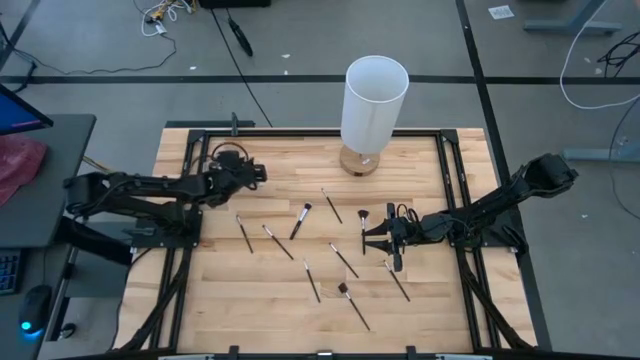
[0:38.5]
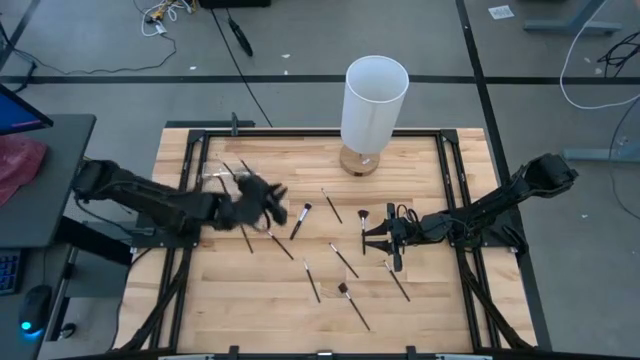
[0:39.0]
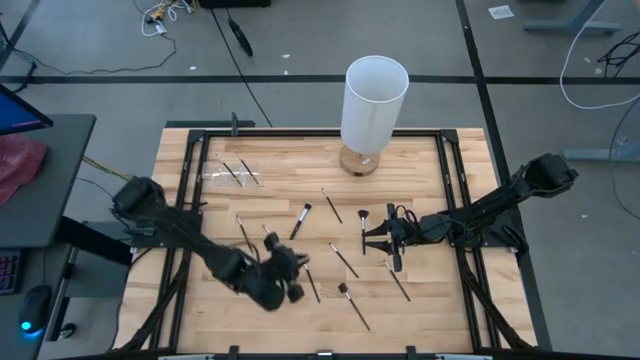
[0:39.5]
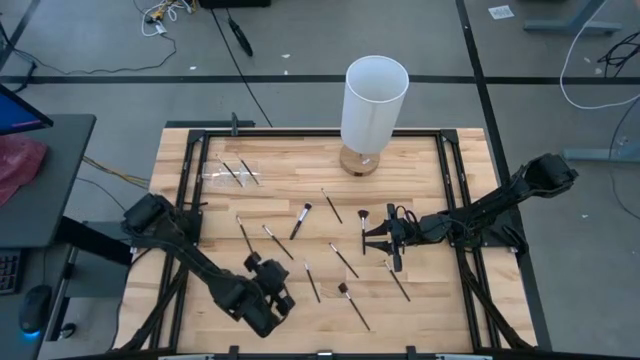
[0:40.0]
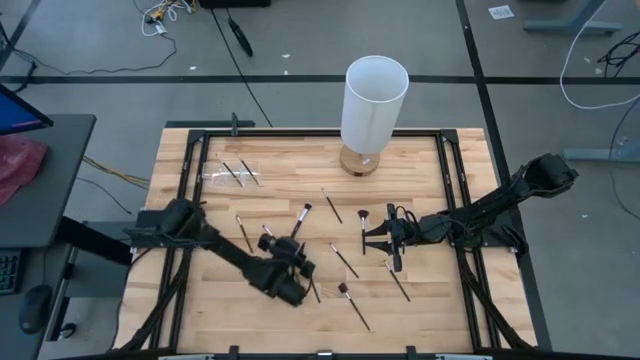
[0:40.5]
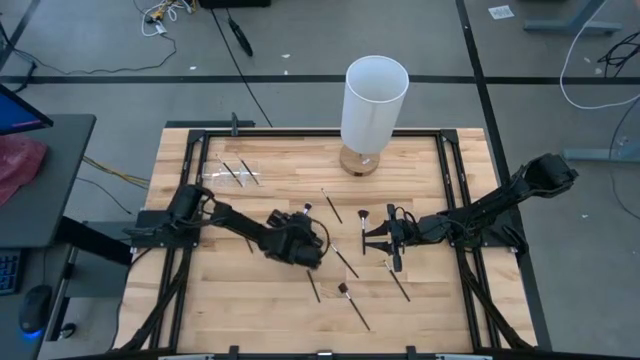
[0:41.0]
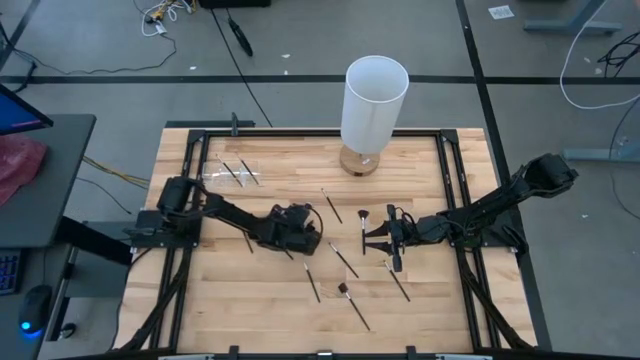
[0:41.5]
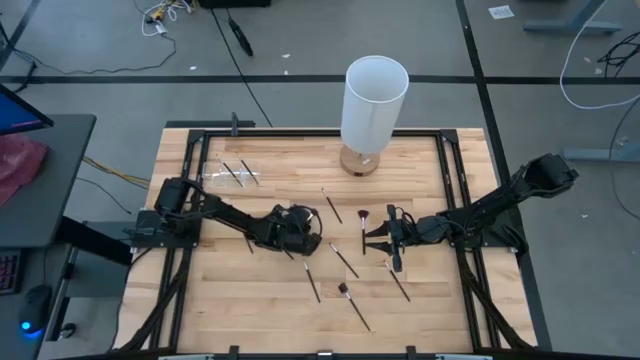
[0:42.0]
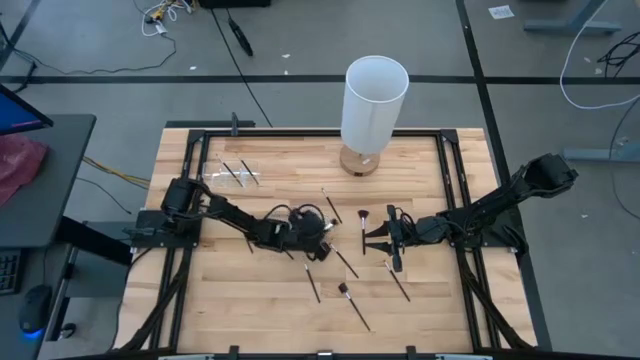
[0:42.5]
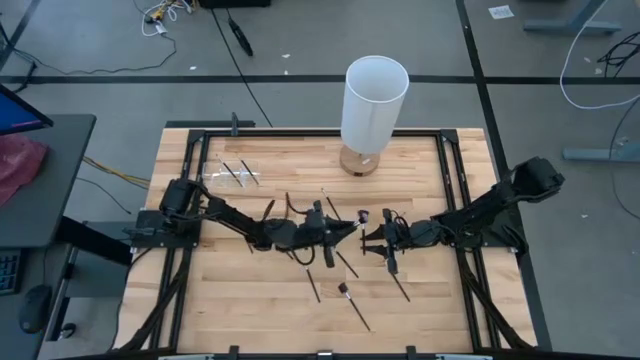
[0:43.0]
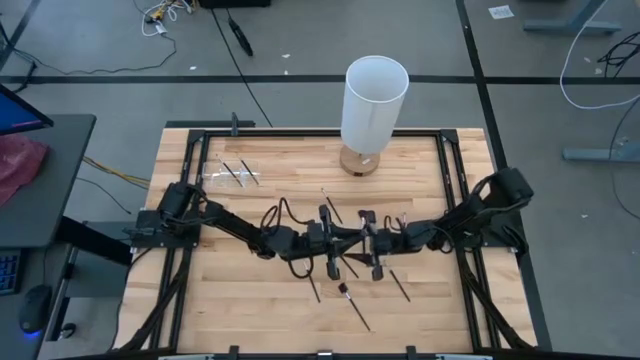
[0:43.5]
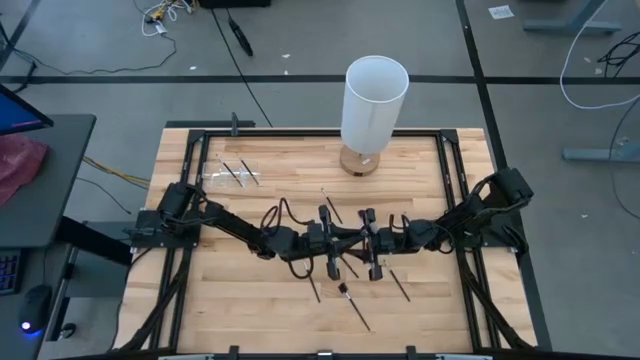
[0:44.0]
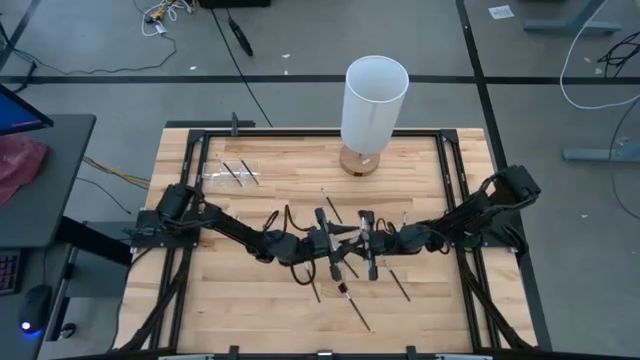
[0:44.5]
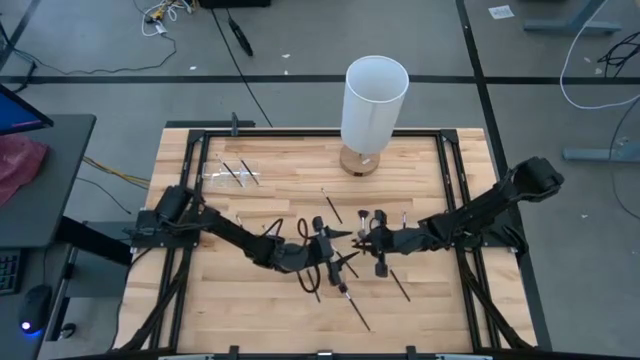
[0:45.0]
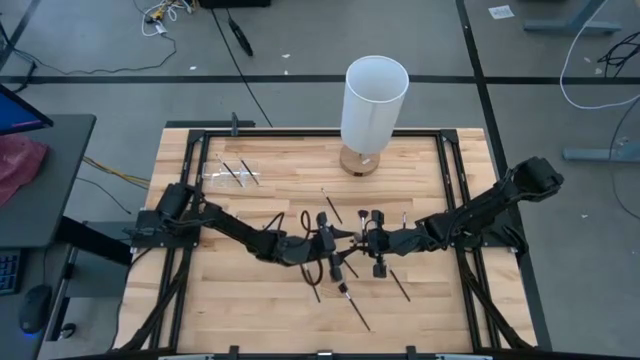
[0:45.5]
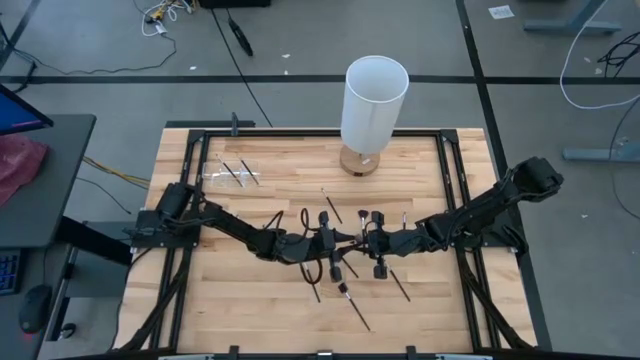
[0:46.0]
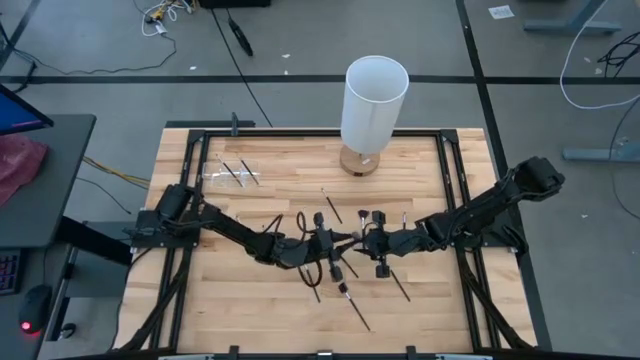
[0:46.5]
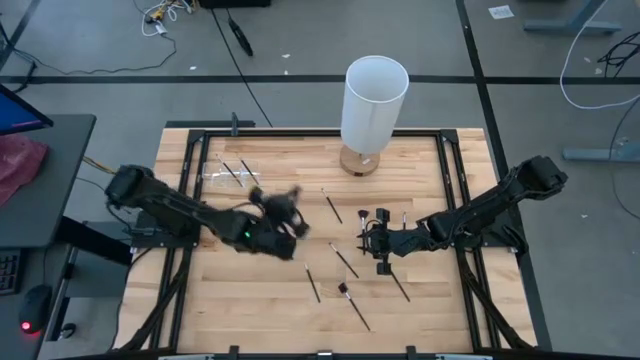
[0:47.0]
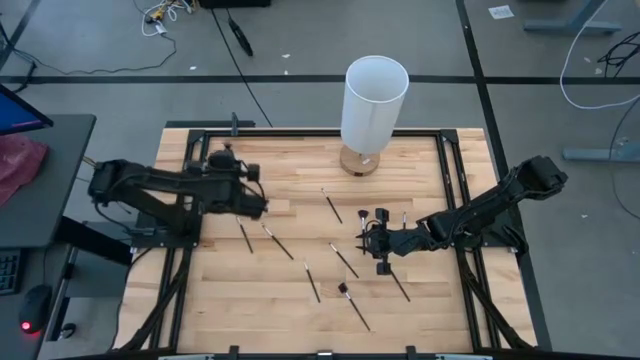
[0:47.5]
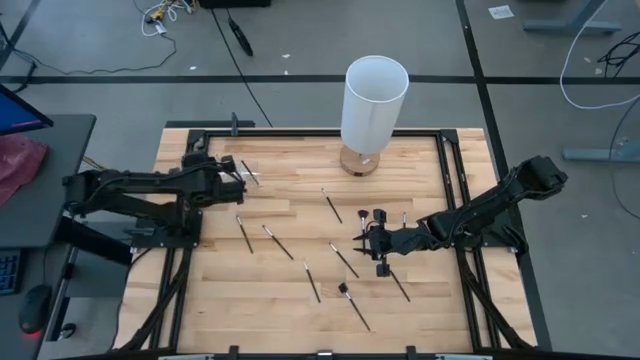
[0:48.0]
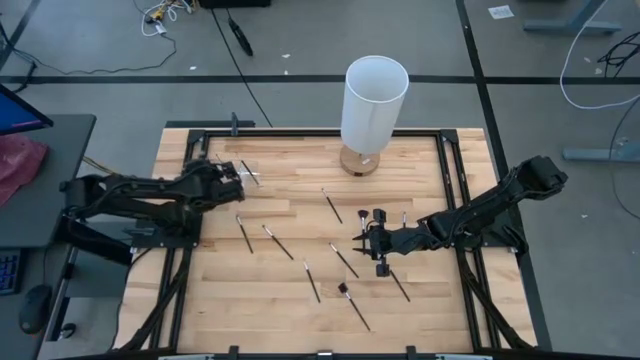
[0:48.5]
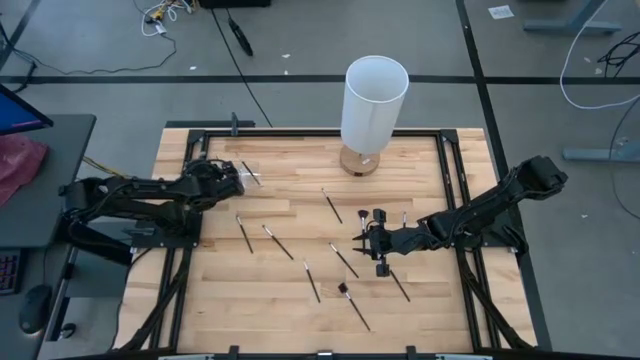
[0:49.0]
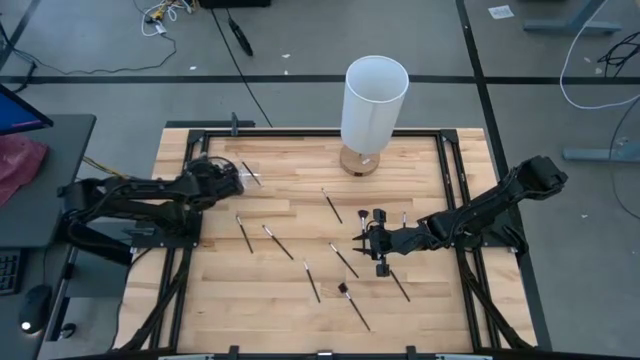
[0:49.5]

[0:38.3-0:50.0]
Task: Put items in baskets/containers
Put the black powder brush into the transparent organizer

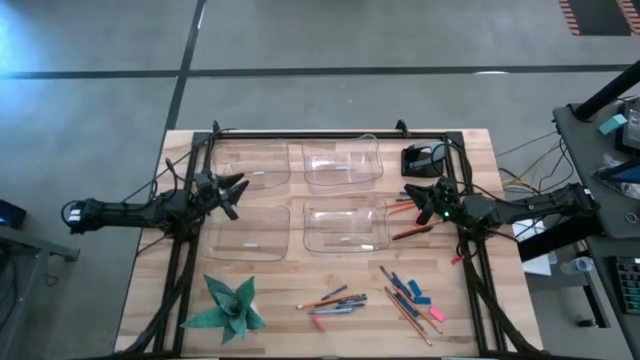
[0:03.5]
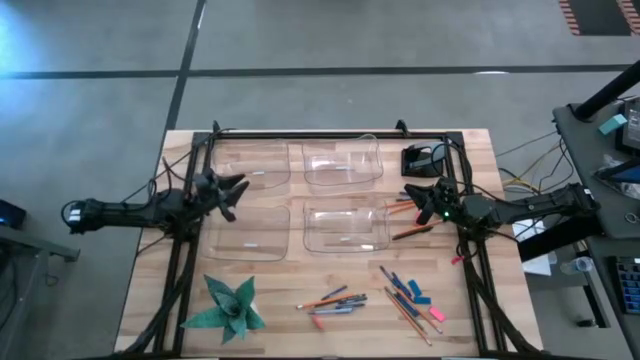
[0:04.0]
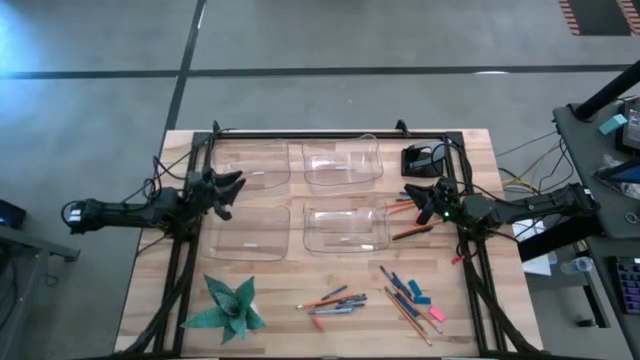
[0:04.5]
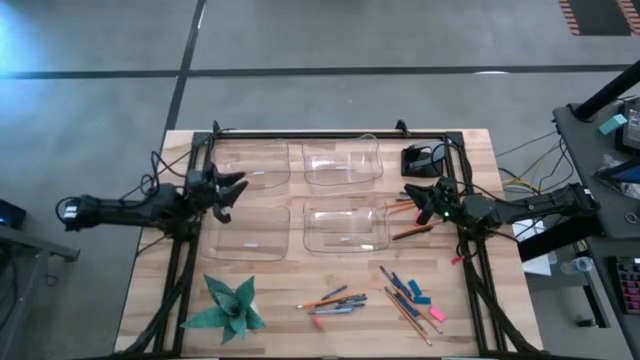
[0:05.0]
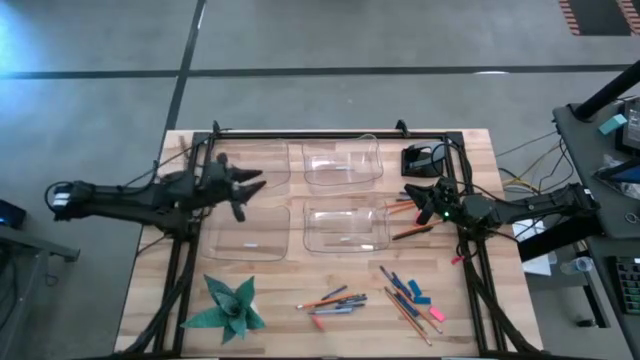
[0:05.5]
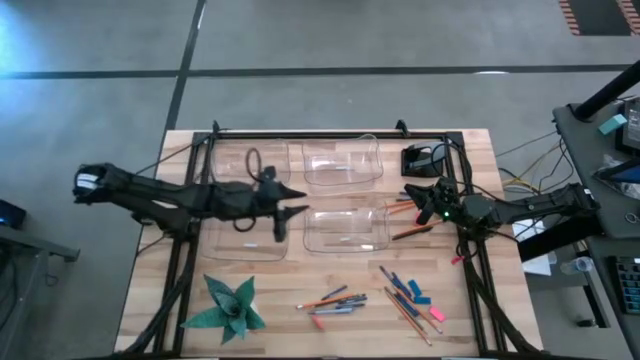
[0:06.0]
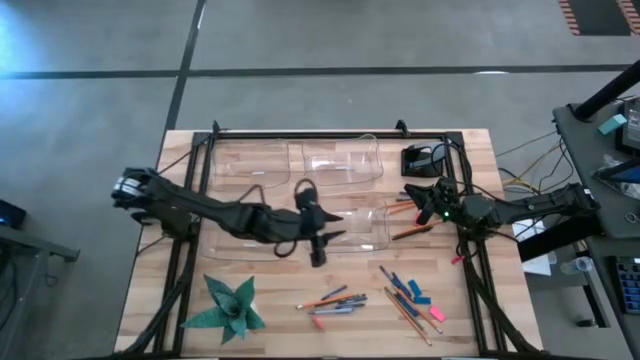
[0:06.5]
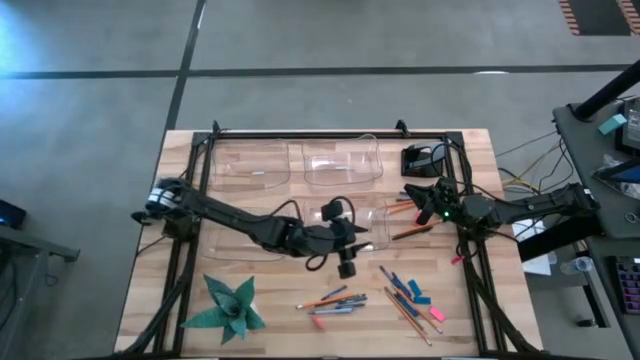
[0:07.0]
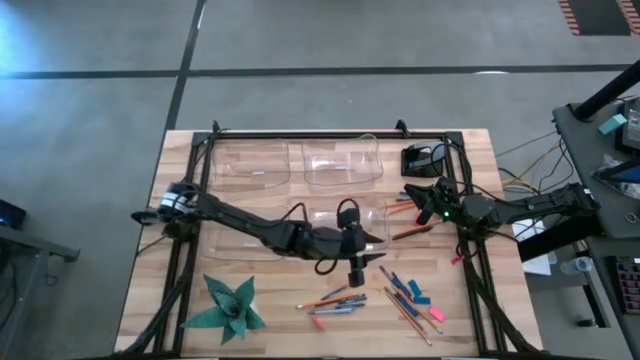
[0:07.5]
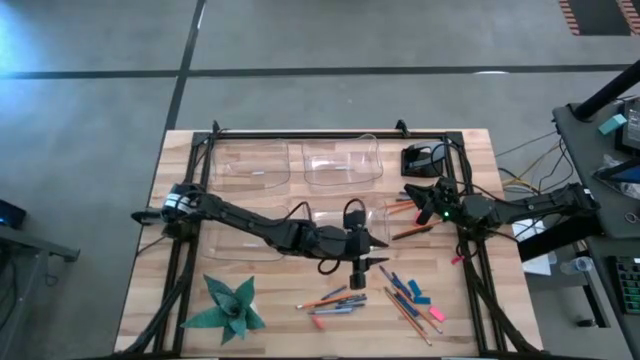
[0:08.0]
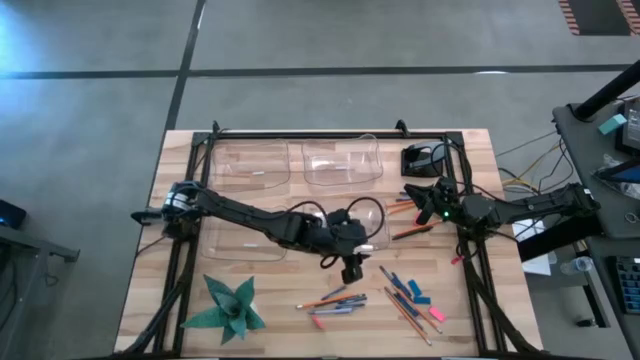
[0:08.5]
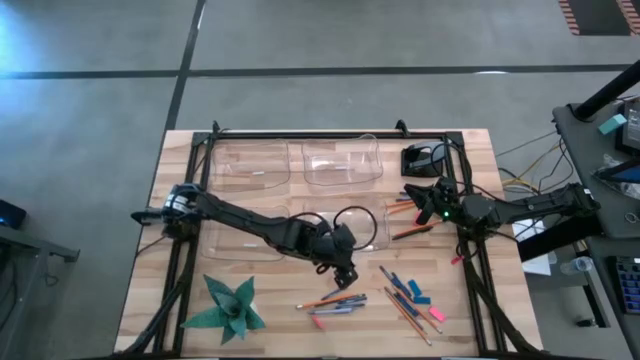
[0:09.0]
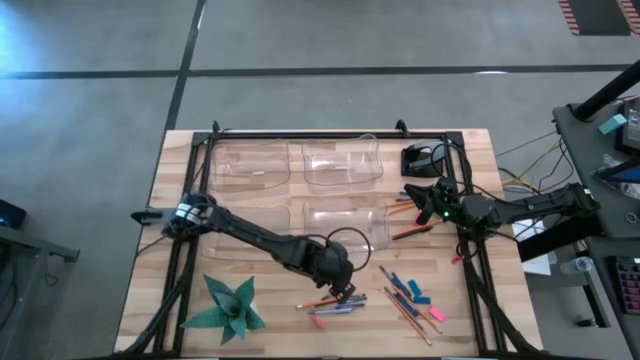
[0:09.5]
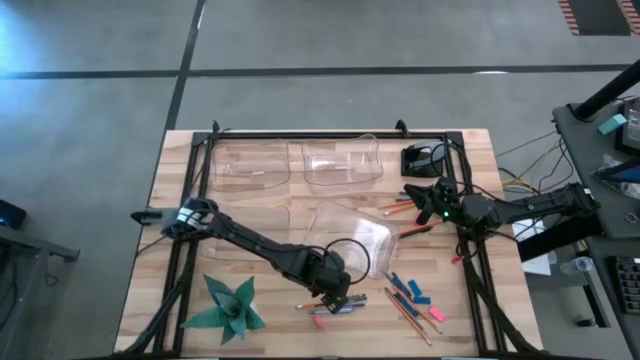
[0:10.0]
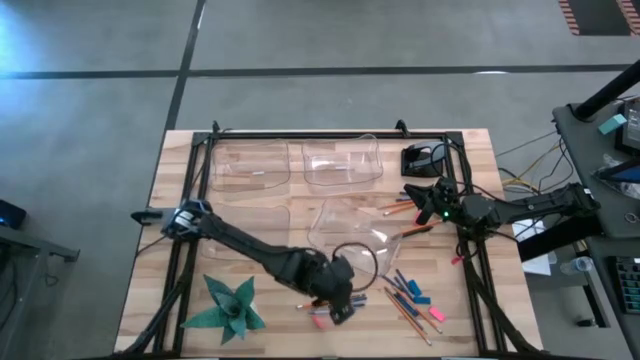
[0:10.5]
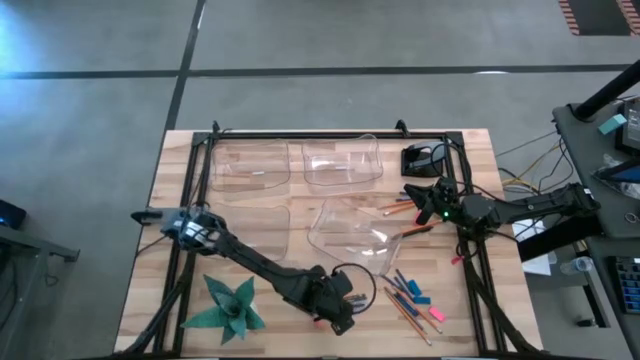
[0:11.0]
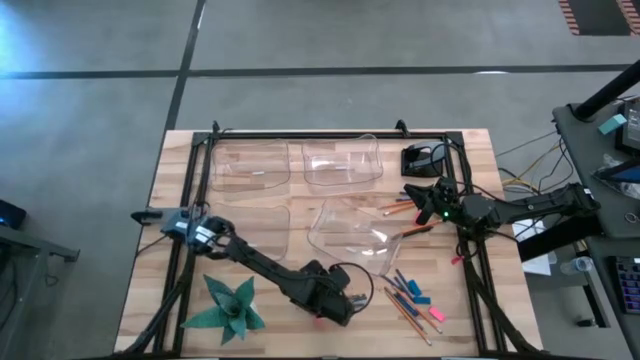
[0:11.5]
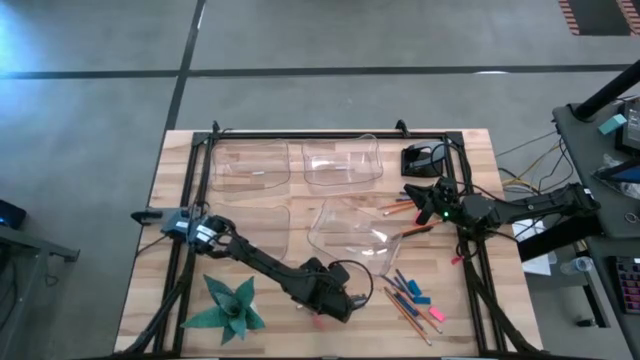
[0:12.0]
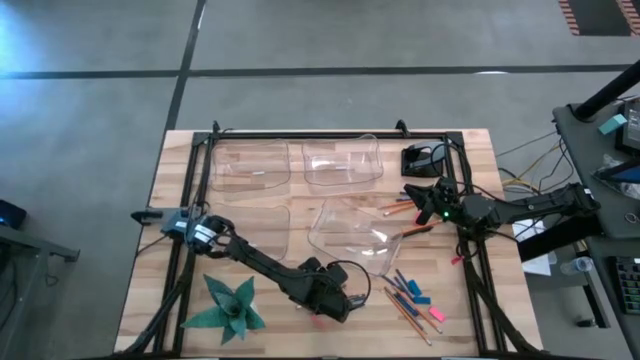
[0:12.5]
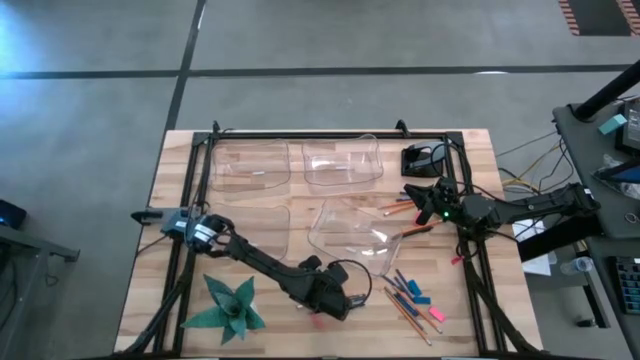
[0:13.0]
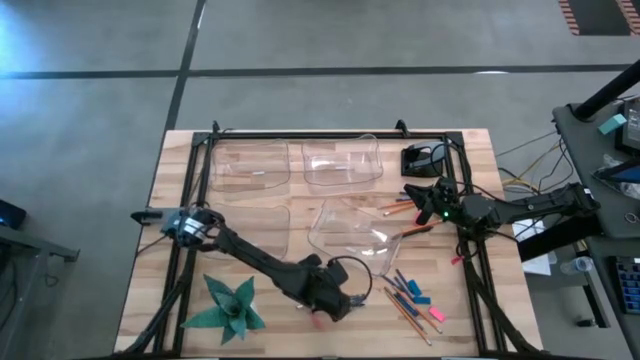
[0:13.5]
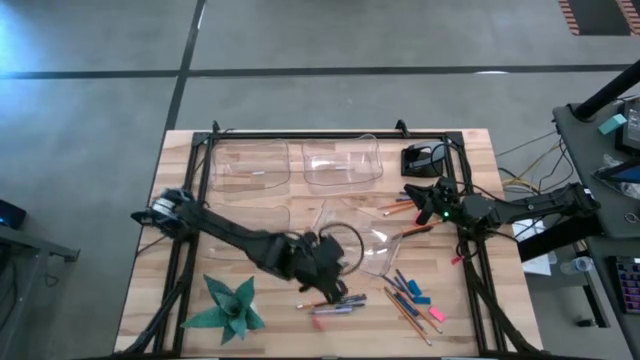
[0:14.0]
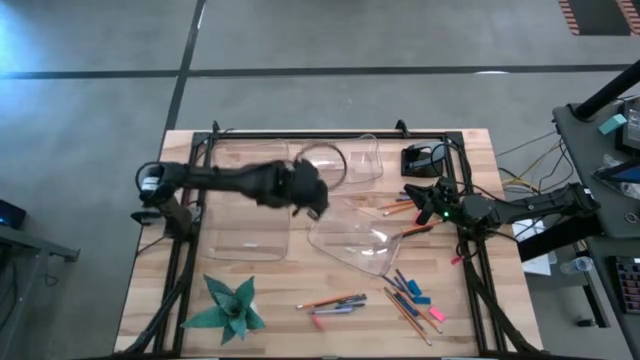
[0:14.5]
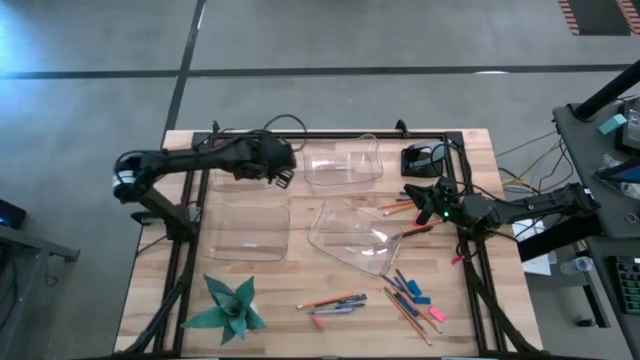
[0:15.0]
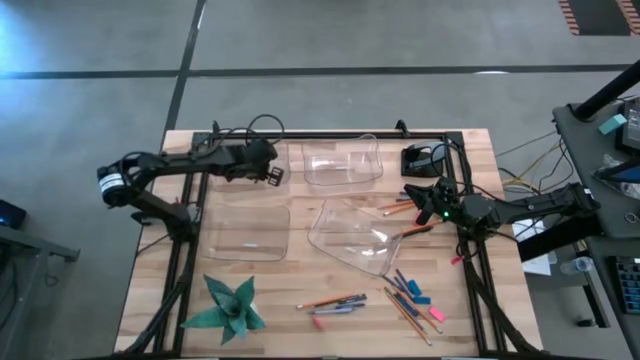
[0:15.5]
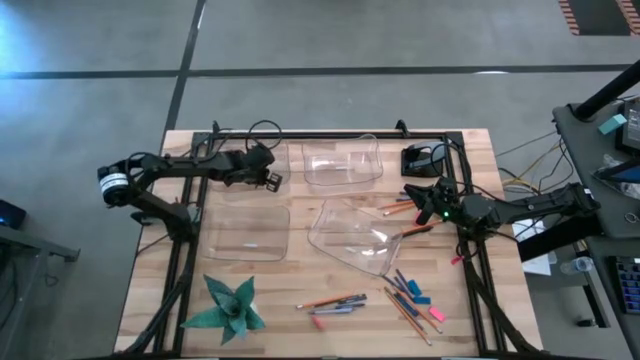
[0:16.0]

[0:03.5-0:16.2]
Task: Sort crayons/erasers/pens/pencils in bins
Put the blue crayon into the top left transparent bin
